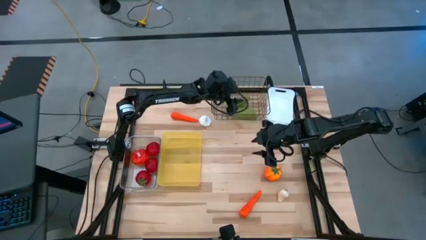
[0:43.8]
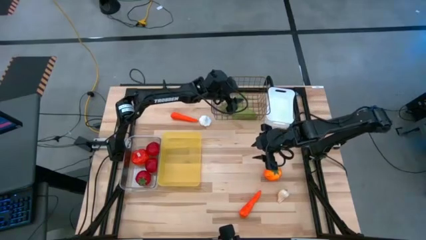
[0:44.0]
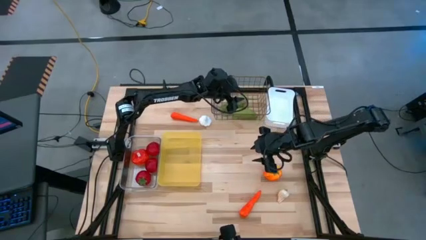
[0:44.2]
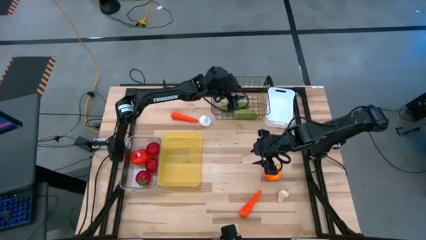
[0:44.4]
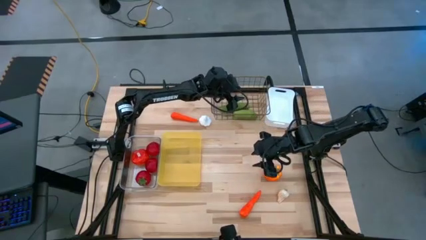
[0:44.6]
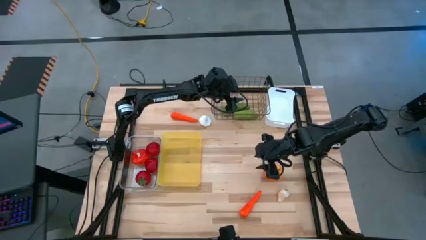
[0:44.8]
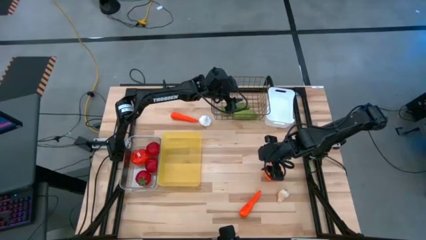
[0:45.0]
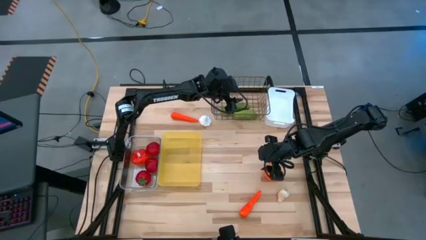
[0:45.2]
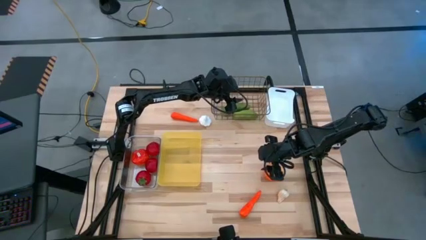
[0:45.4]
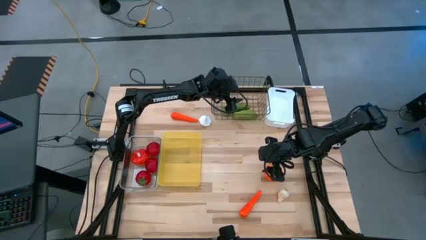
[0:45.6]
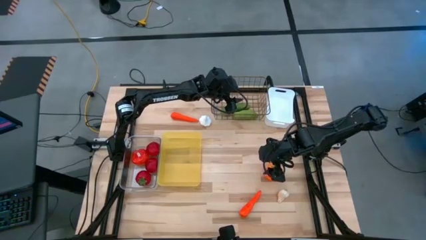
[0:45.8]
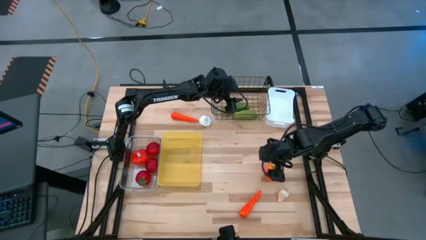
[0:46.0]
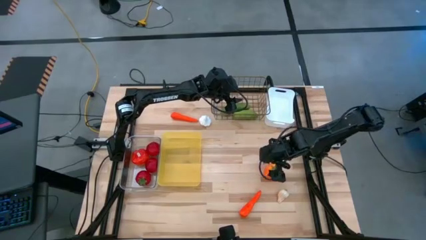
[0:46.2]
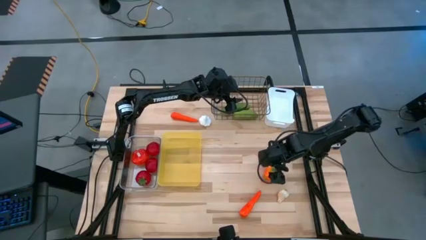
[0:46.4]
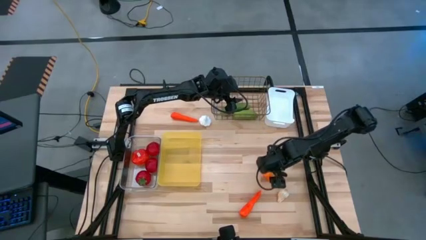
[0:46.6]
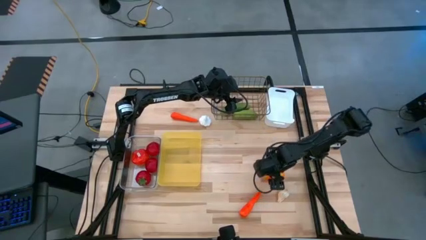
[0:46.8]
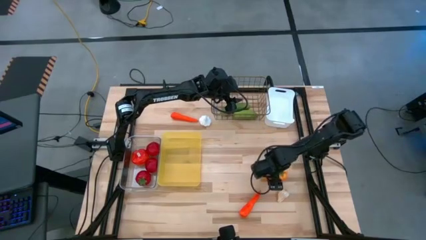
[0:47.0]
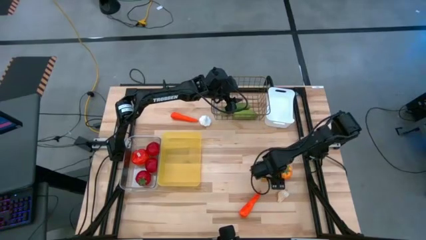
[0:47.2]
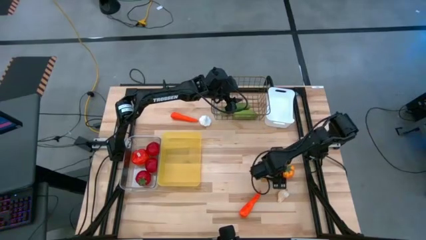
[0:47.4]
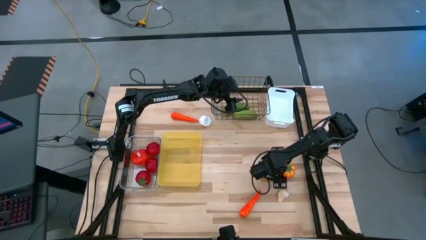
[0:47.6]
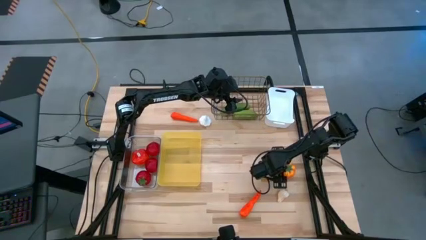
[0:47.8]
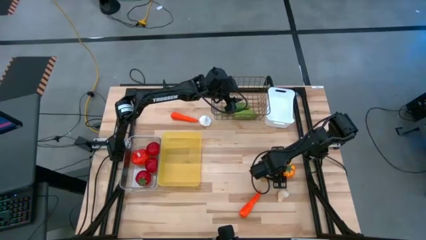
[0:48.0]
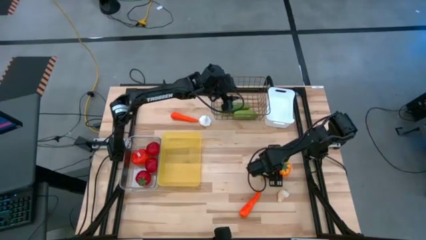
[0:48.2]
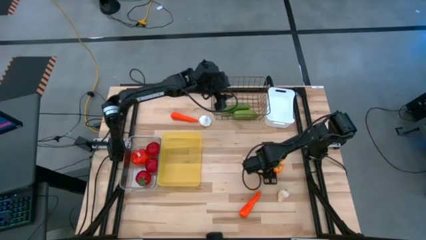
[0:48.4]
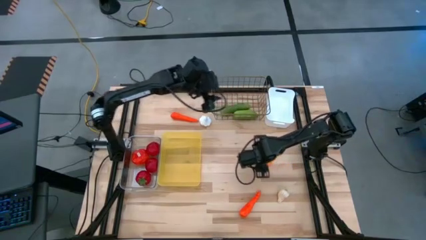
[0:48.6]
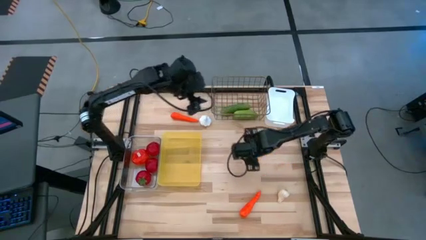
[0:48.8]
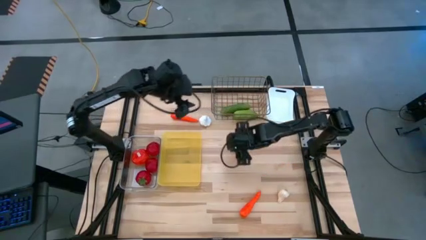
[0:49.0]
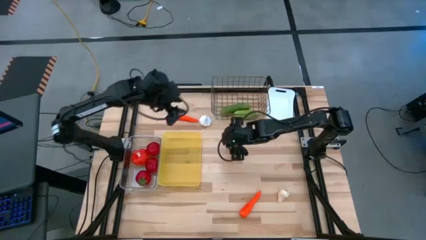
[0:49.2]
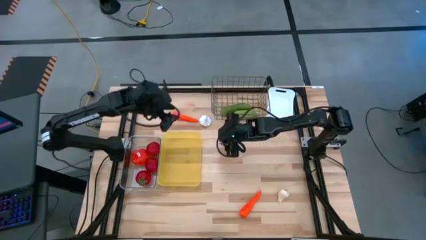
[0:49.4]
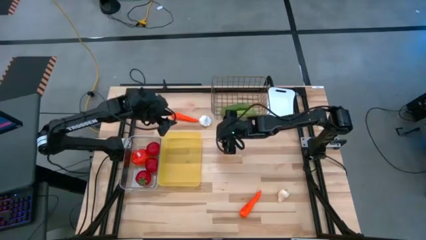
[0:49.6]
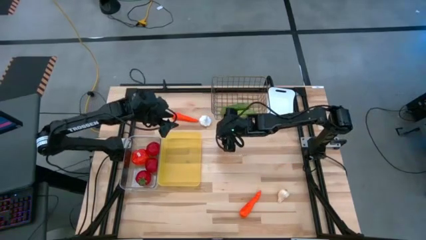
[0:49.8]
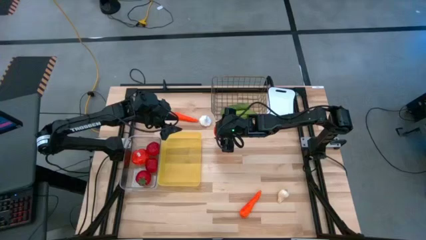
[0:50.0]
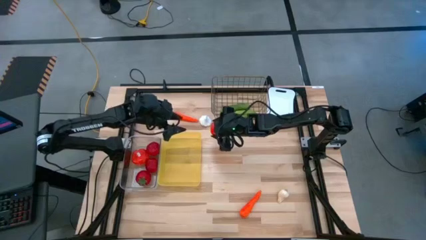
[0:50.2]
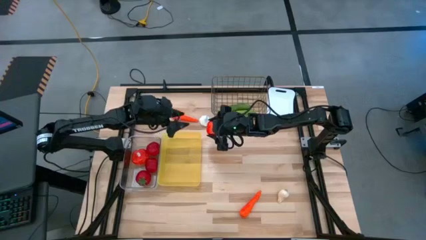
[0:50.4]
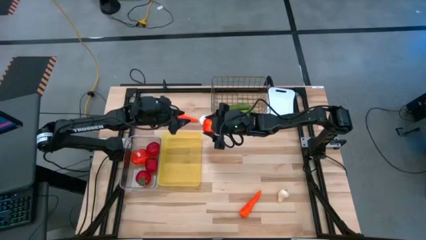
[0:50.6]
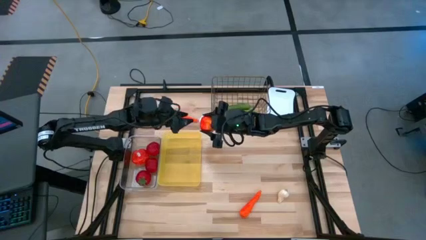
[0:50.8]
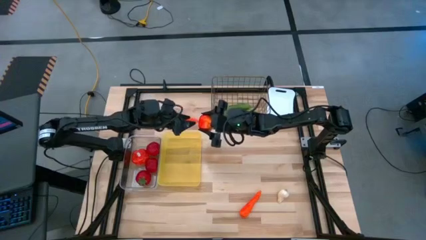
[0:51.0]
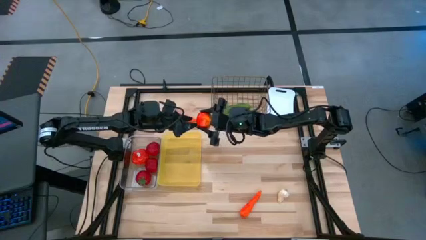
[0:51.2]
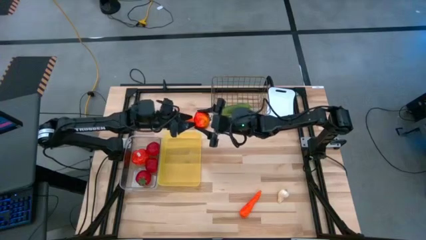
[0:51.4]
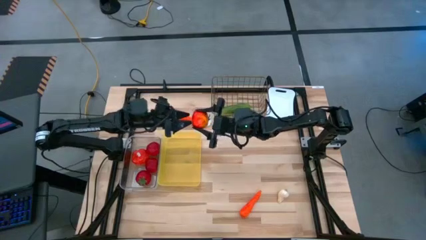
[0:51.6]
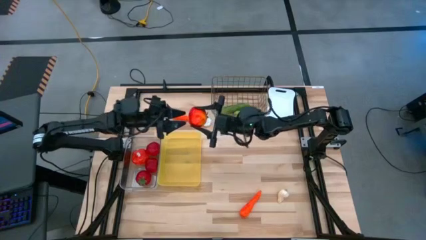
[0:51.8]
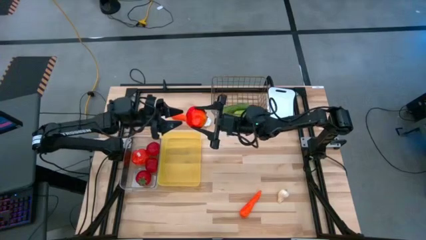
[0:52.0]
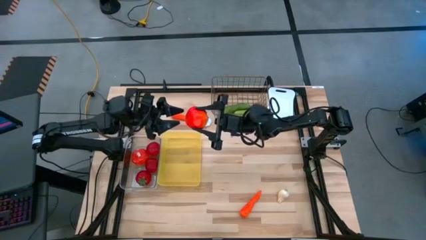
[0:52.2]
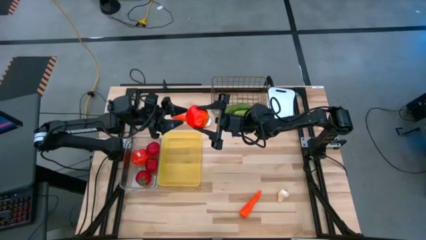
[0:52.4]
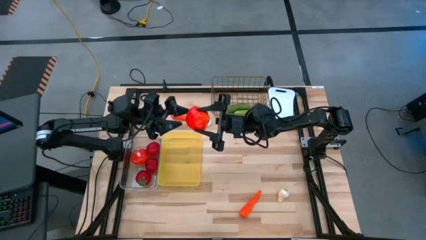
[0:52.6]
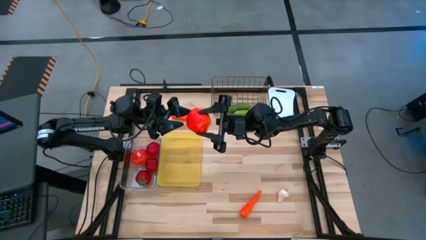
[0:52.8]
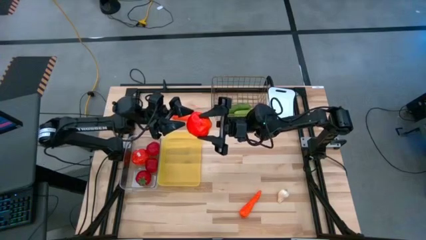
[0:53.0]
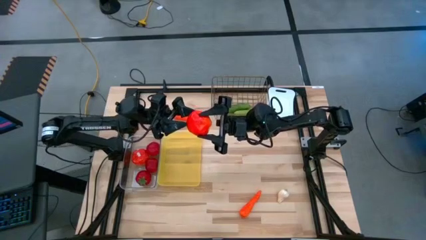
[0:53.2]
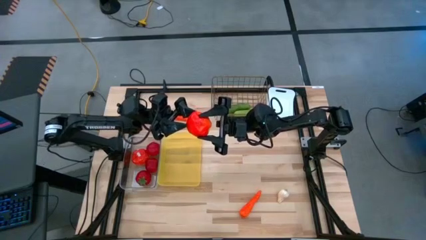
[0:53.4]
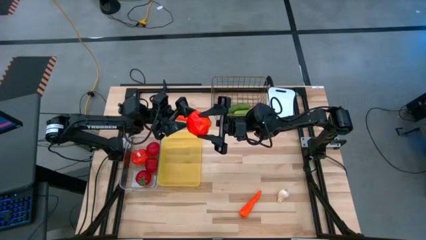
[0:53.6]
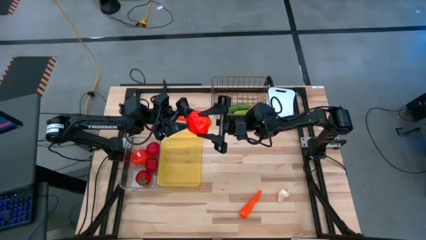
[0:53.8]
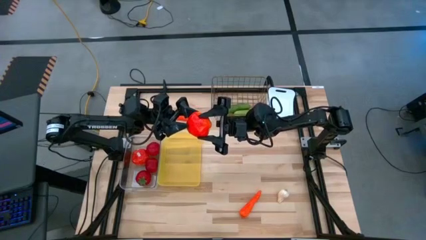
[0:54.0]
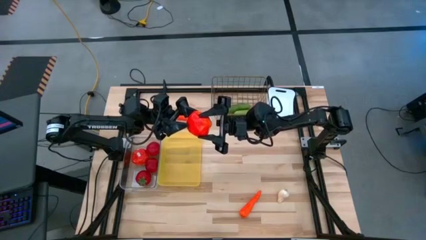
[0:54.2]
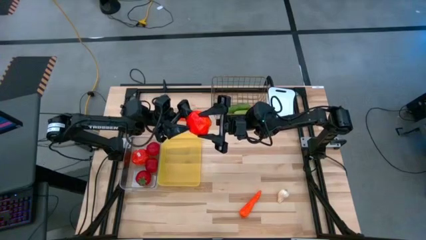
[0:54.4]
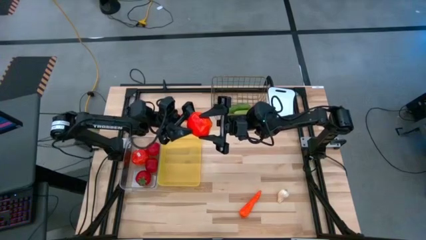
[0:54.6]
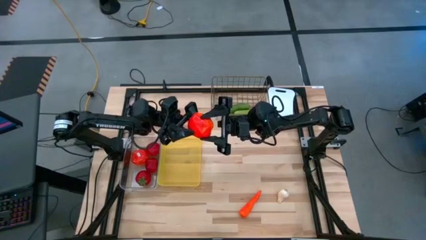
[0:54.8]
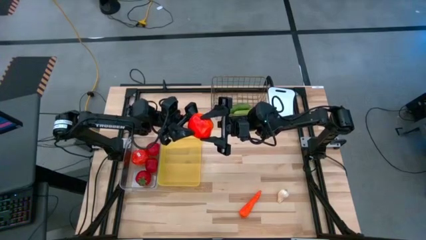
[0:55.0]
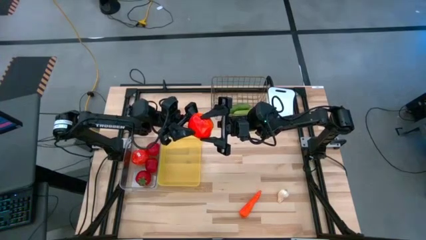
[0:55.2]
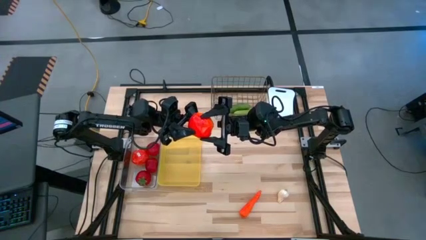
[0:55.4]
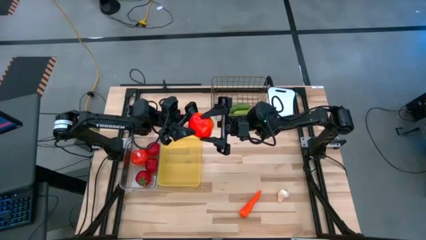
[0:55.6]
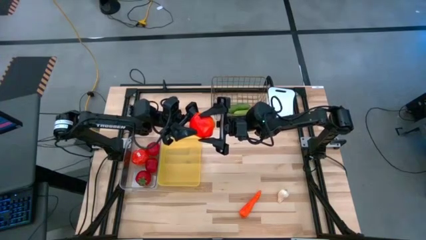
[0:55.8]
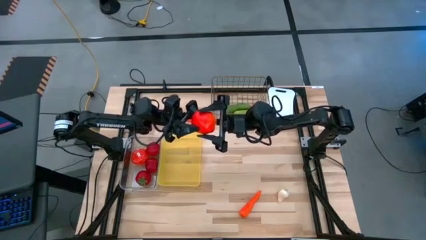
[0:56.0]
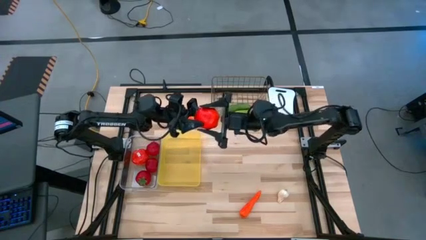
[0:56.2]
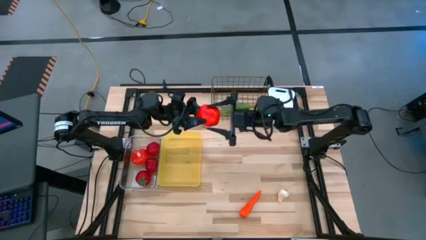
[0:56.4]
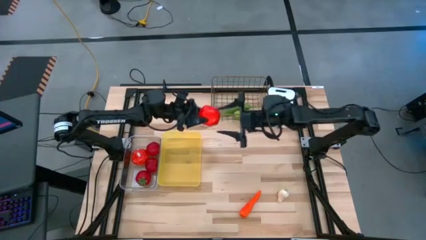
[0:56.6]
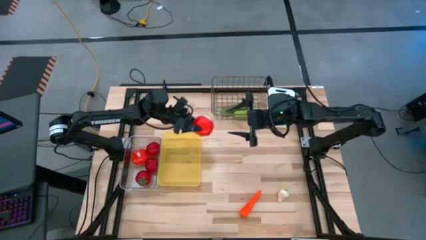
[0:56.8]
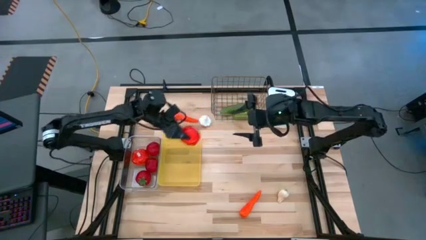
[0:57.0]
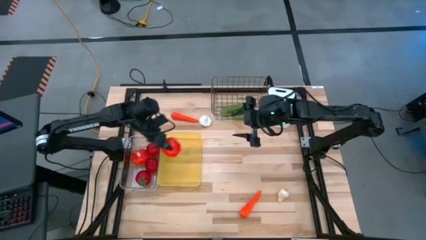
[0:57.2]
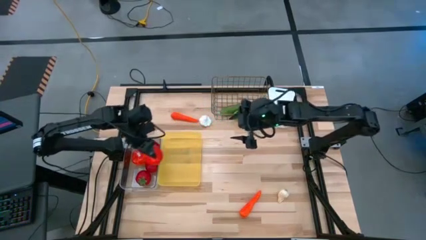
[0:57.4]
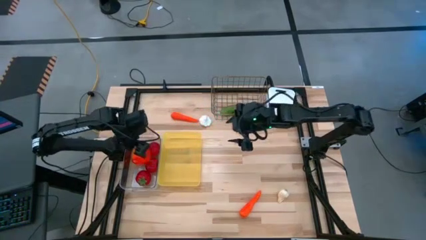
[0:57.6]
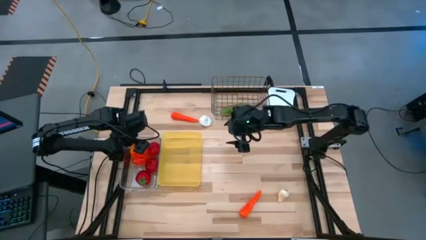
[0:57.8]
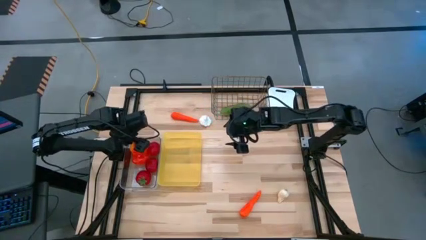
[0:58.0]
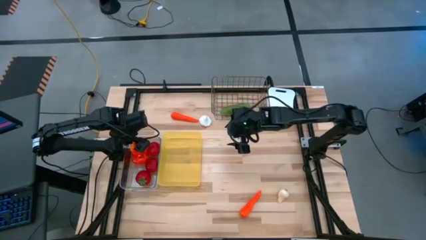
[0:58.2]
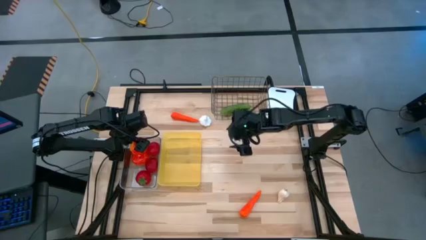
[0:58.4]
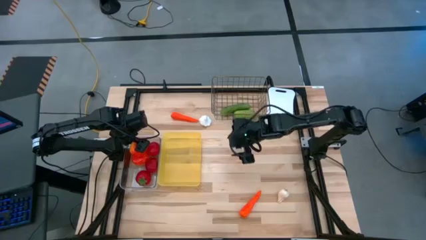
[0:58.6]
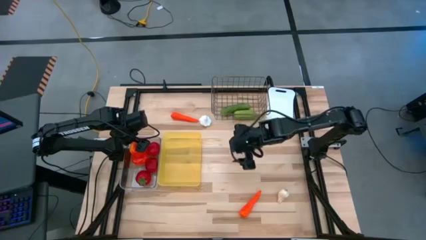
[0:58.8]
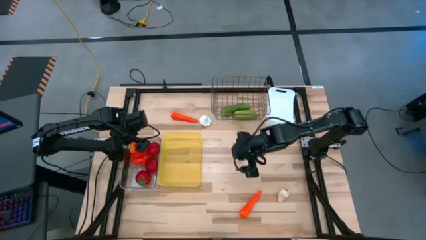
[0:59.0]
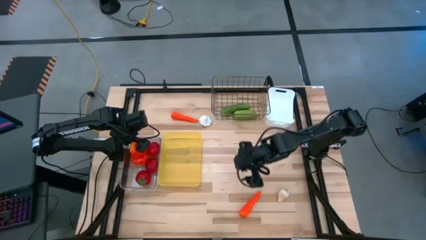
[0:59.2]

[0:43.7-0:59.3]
Task: Sort produce into baskets
Put the orange tomato into the transparent bin
